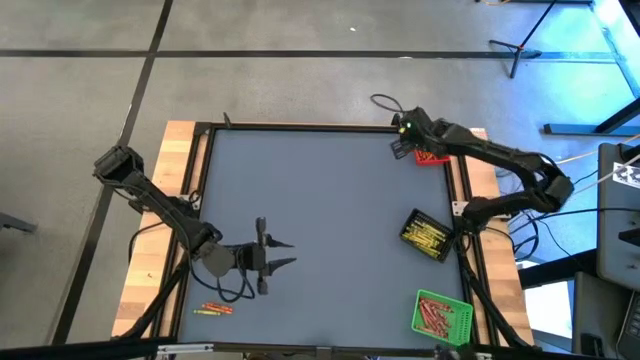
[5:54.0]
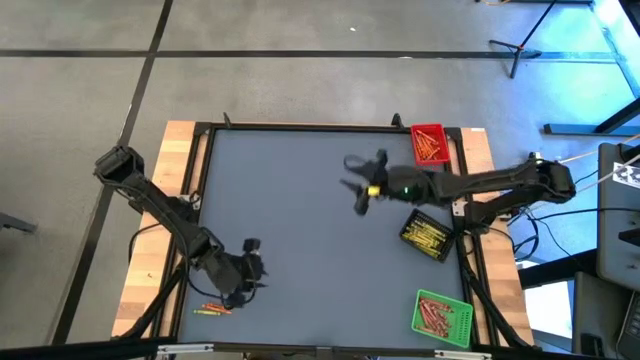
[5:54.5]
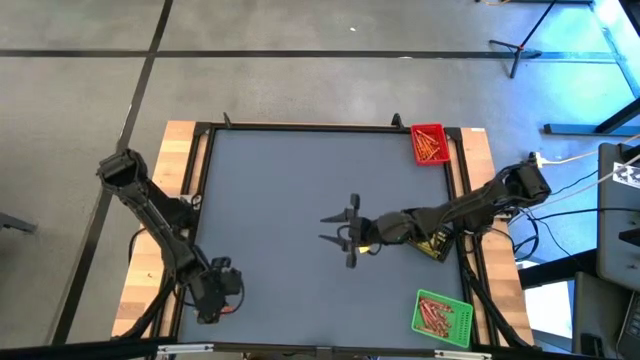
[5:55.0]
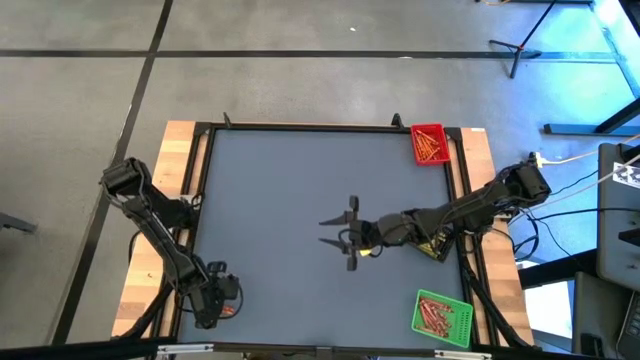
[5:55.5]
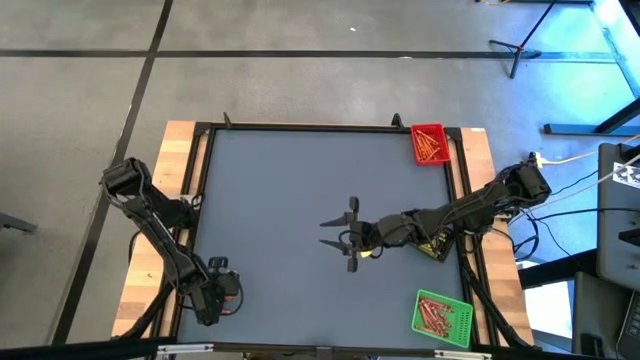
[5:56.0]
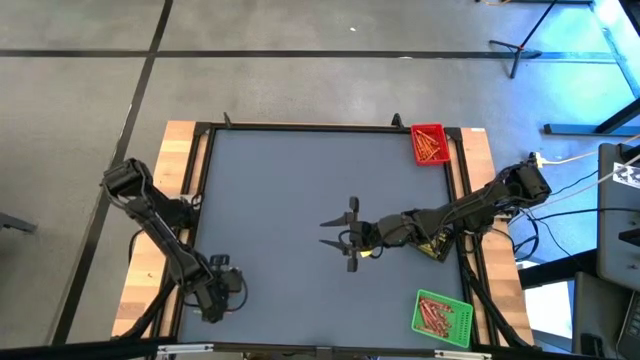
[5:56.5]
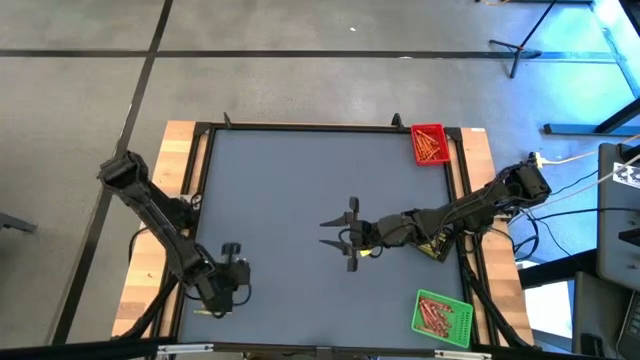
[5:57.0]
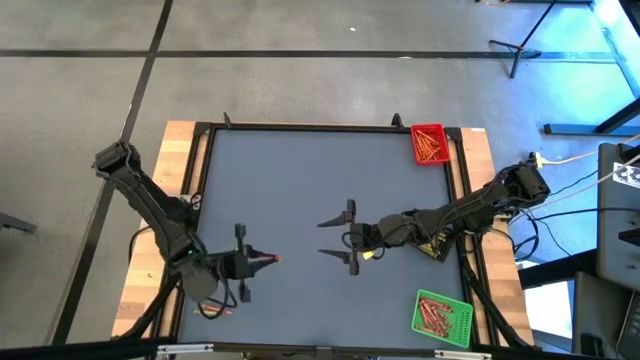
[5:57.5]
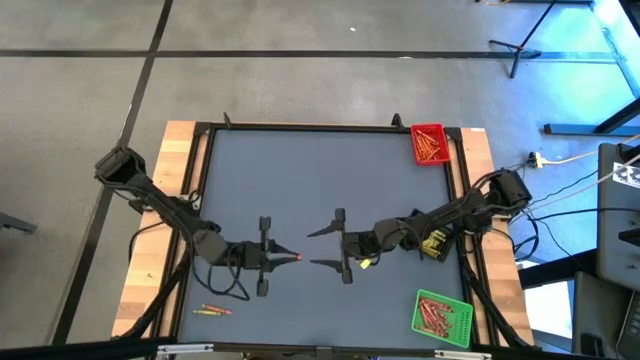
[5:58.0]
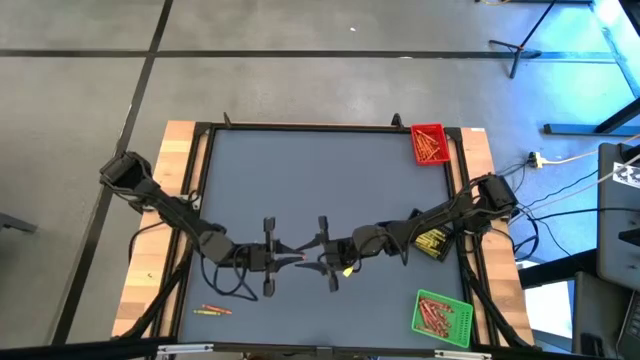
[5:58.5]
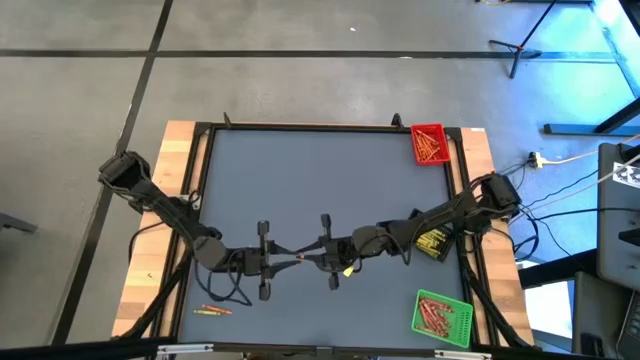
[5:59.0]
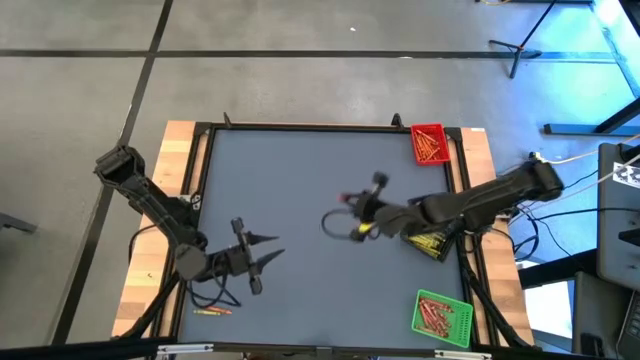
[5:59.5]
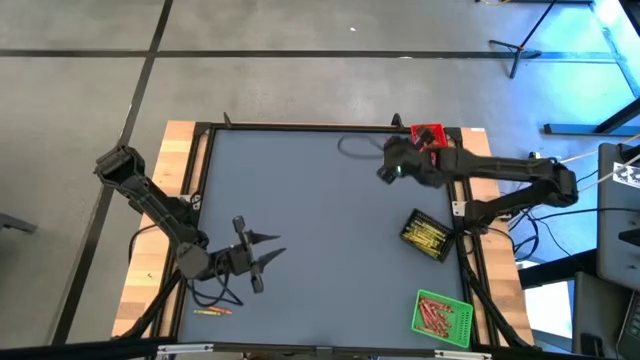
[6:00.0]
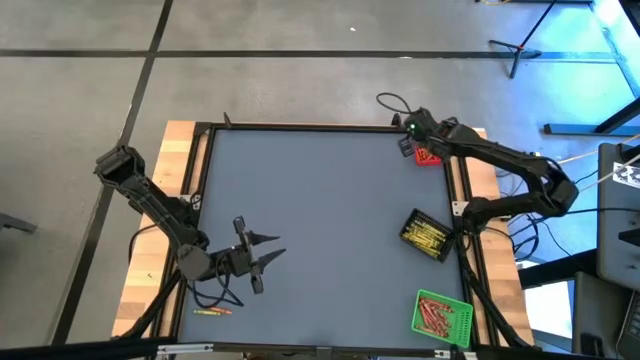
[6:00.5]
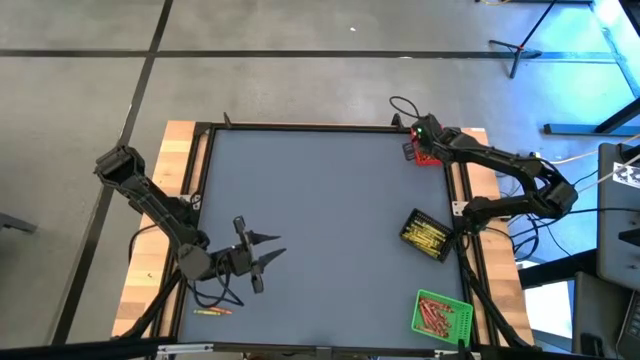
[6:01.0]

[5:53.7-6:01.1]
Task: Sort crayons
Put the orange crayon into the red basket

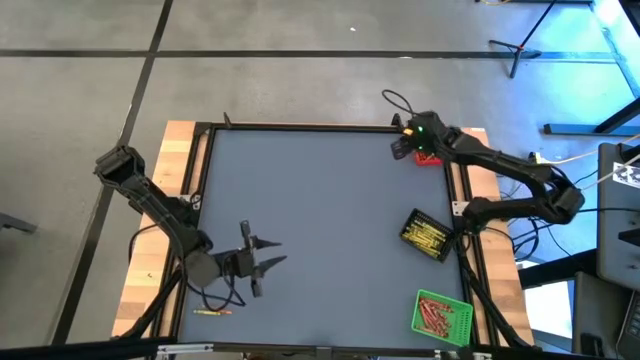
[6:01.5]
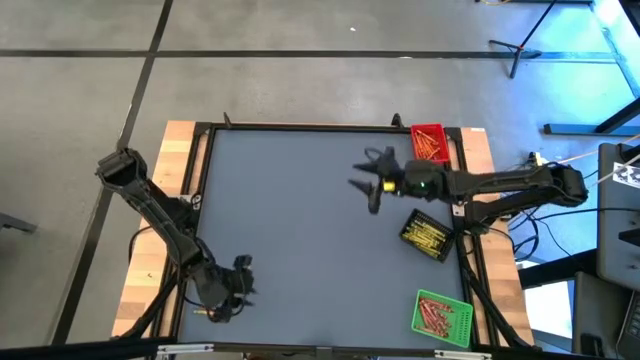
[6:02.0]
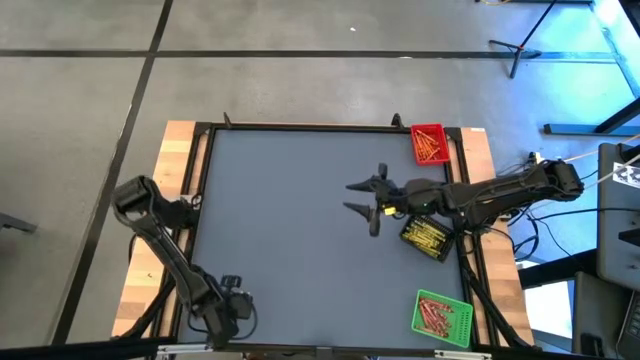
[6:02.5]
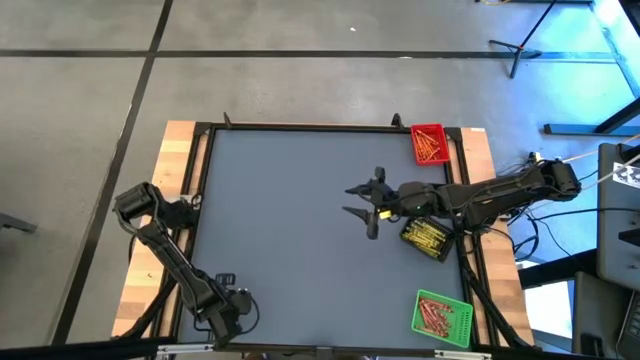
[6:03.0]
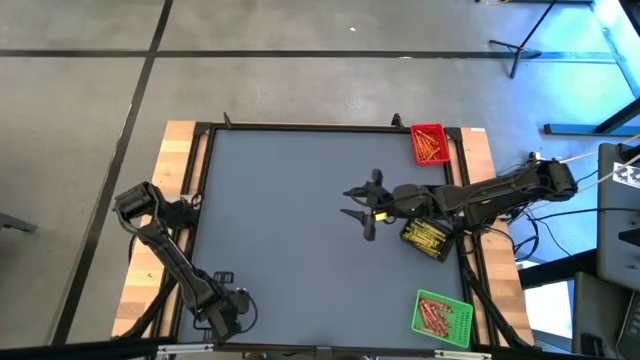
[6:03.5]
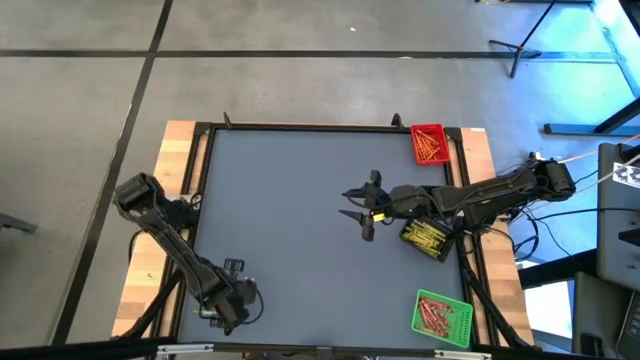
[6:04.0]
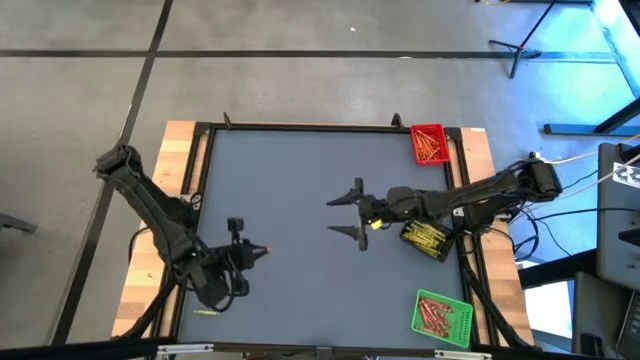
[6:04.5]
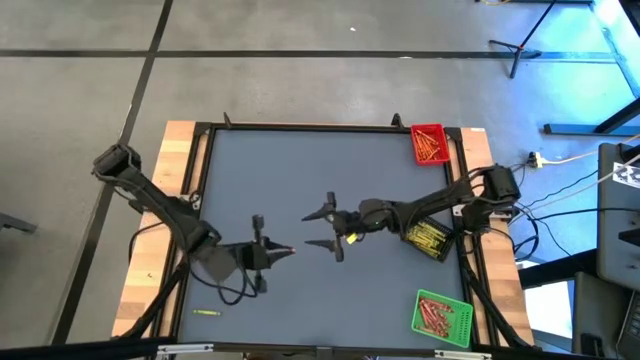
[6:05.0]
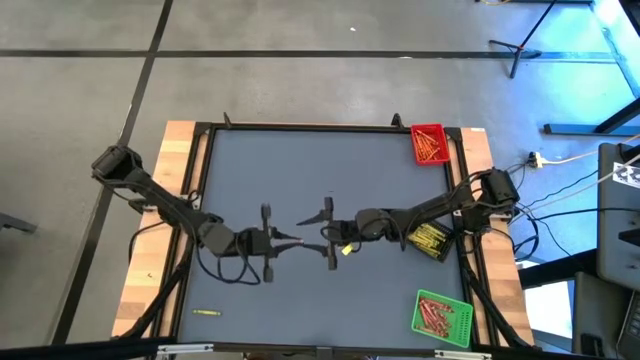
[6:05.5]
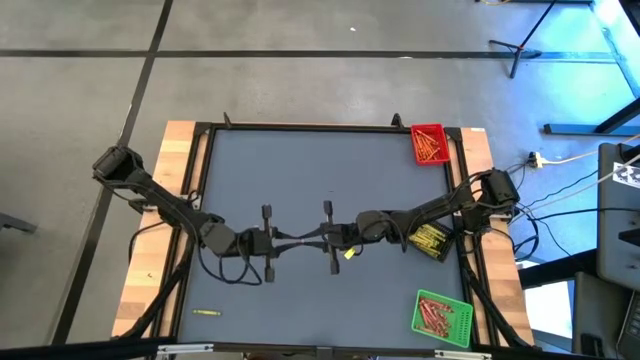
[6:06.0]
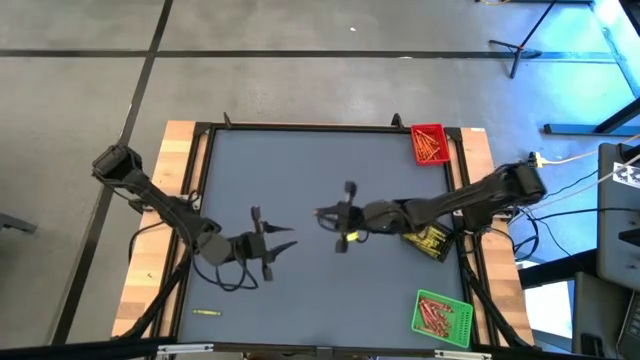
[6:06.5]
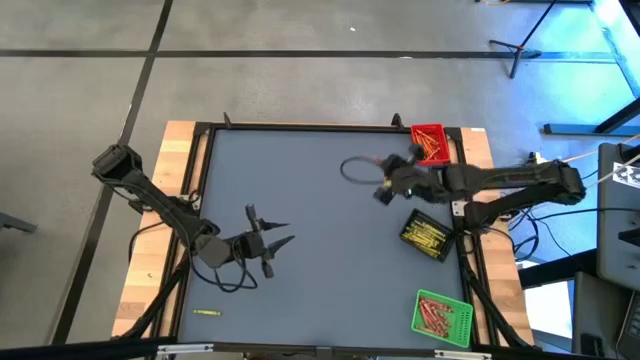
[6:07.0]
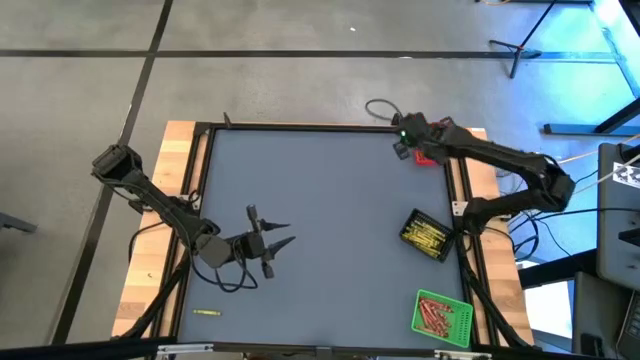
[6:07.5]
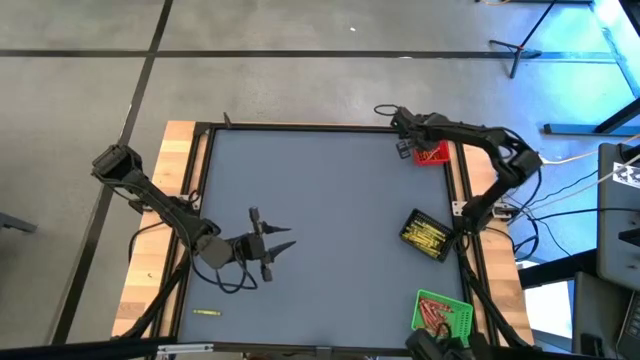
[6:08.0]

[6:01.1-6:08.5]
Put the orange crayon into the red basket

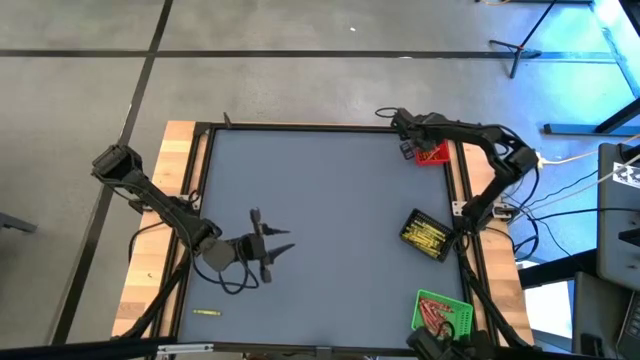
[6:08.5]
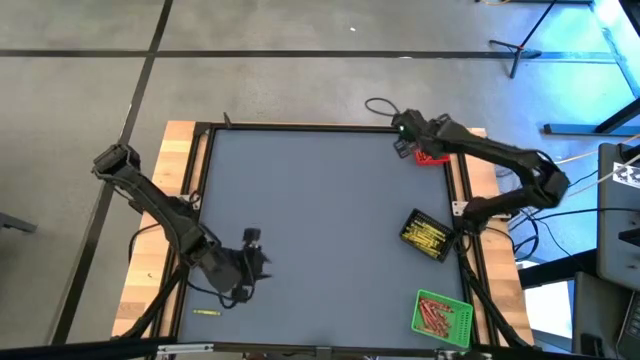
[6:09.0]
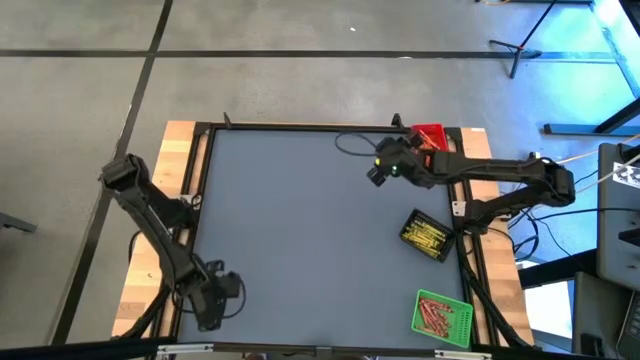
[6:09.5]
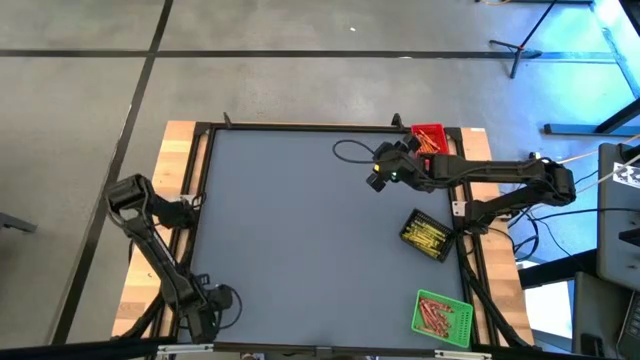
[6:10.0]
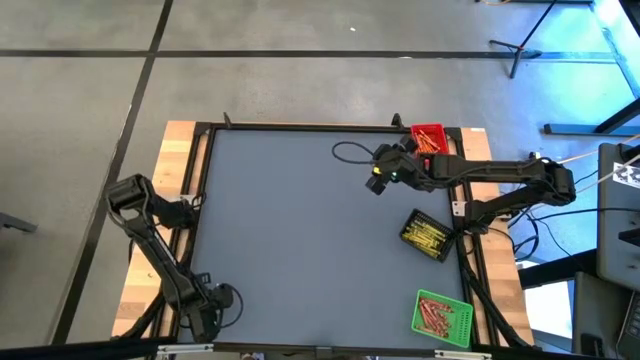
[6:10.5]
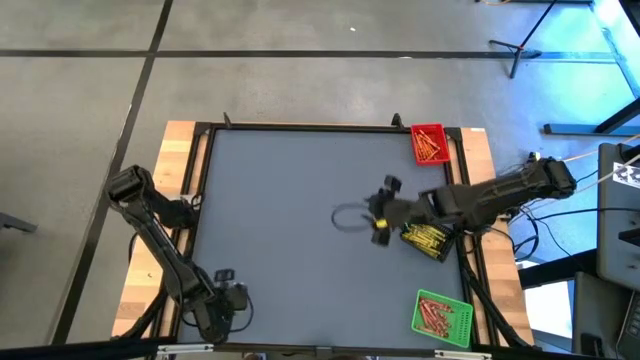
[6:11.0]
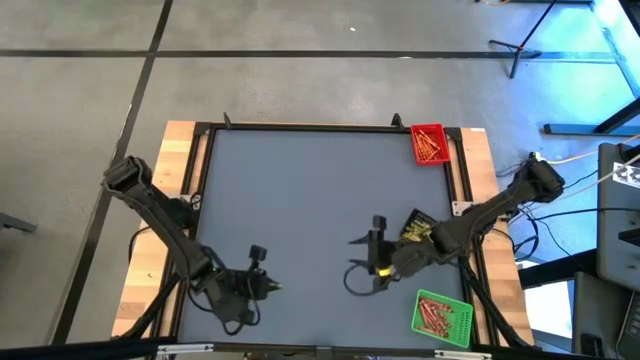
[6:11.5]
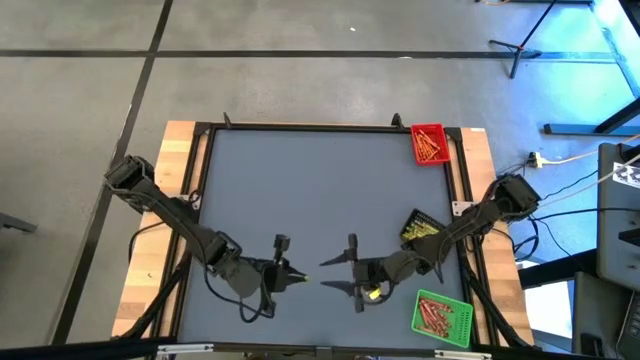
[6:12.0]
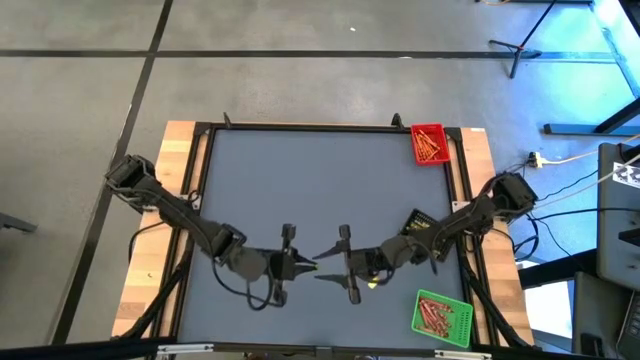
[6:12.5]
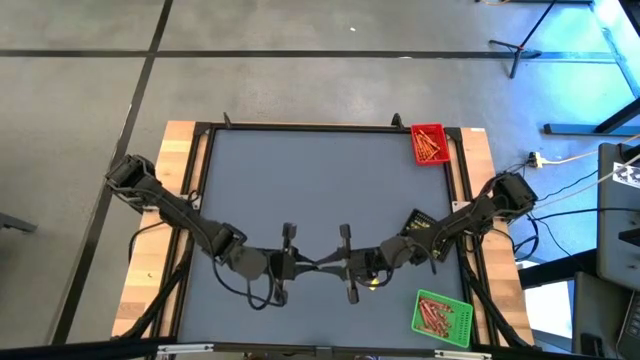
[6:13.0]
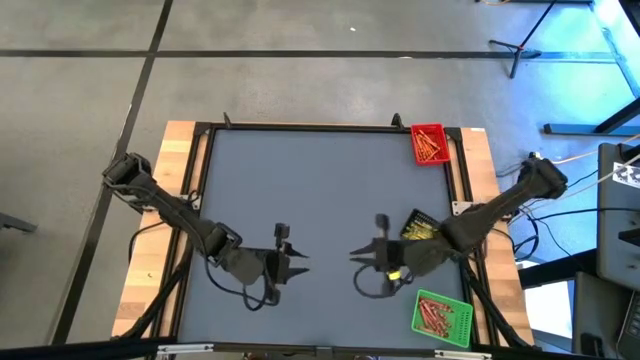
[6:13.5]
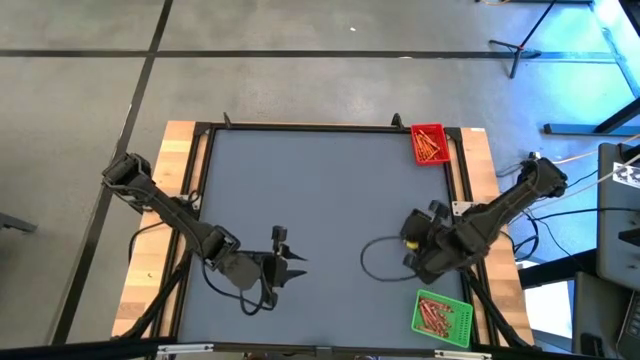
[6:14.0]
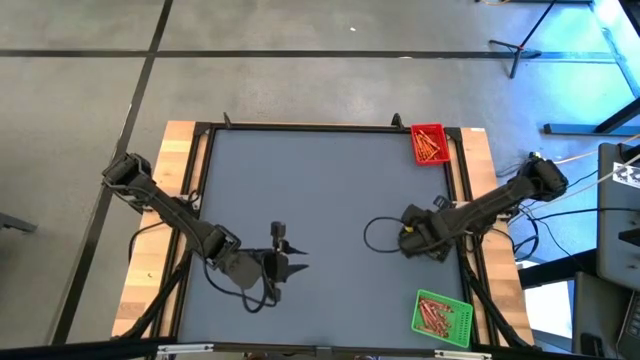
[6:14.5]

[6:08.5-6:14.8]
Put the orange crayon into the red basket
